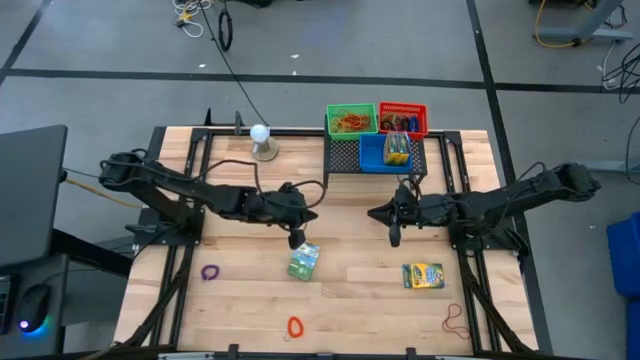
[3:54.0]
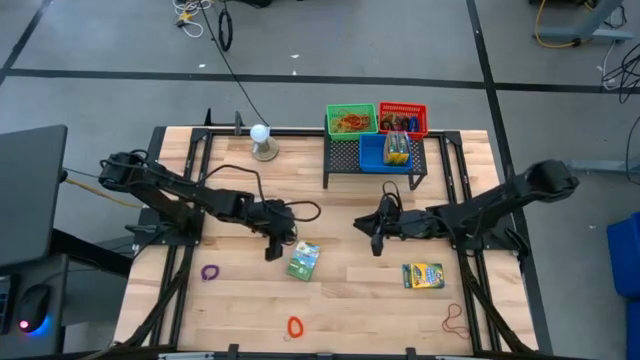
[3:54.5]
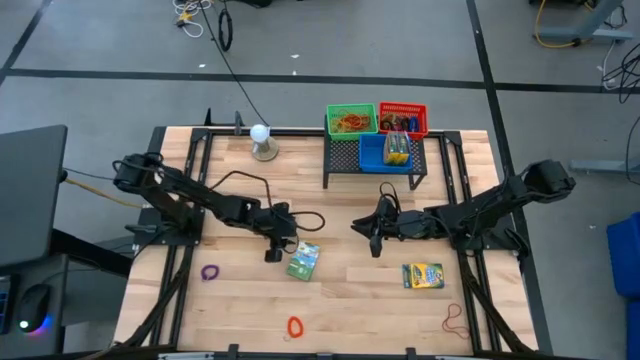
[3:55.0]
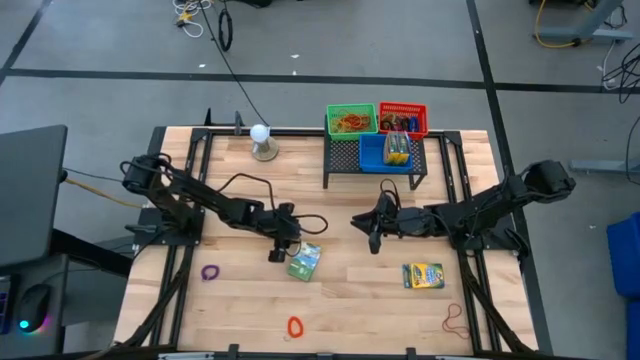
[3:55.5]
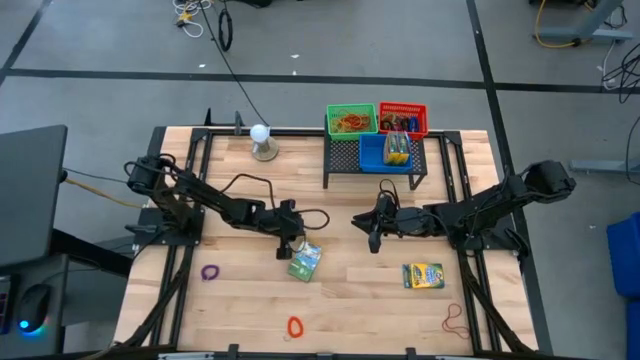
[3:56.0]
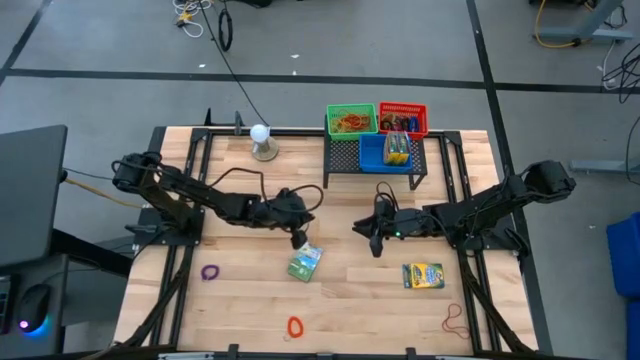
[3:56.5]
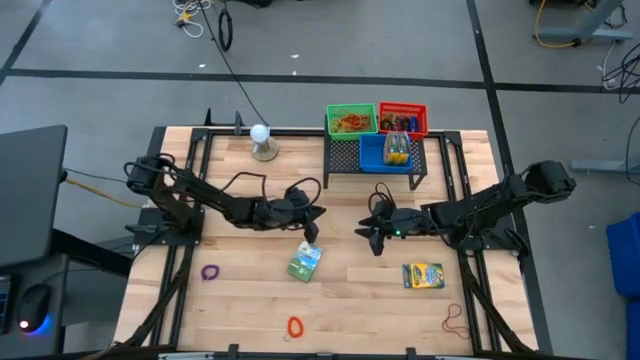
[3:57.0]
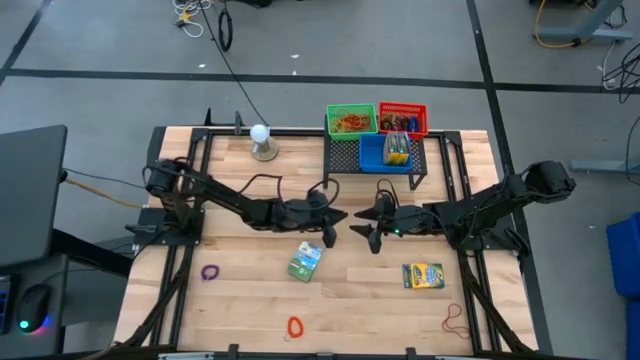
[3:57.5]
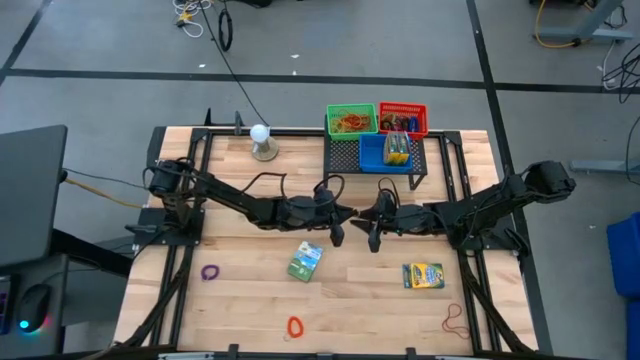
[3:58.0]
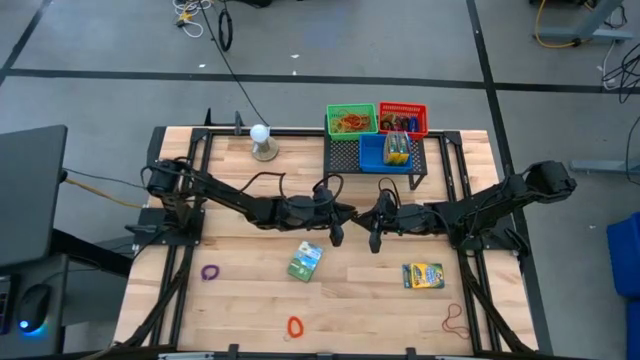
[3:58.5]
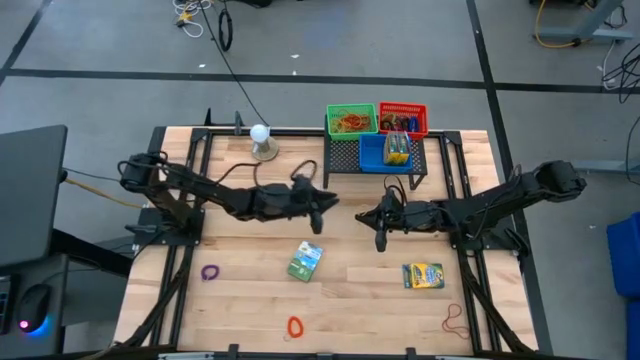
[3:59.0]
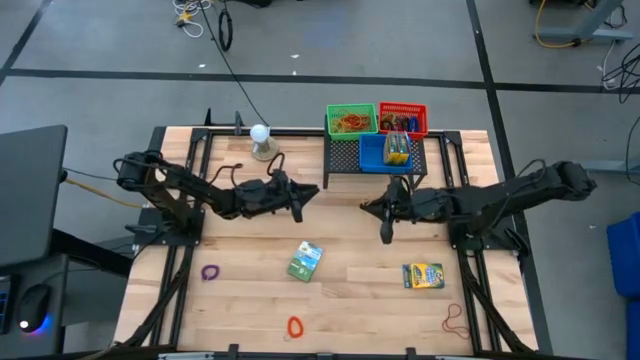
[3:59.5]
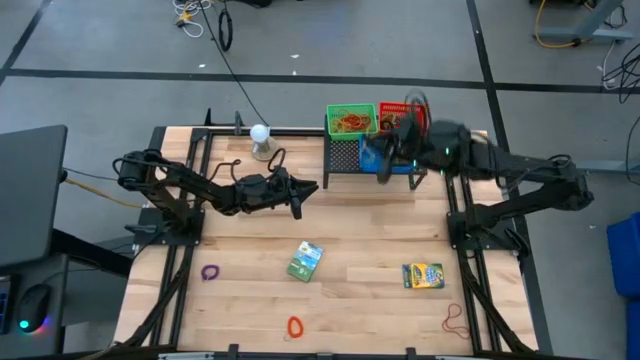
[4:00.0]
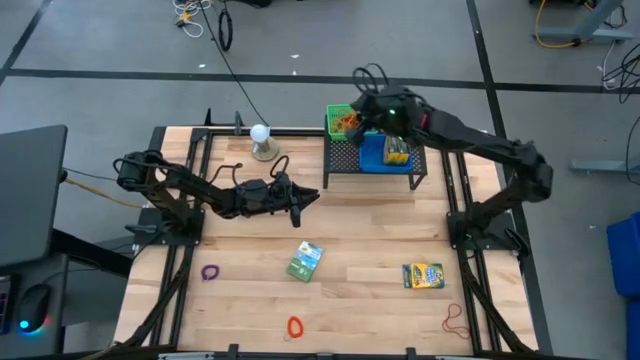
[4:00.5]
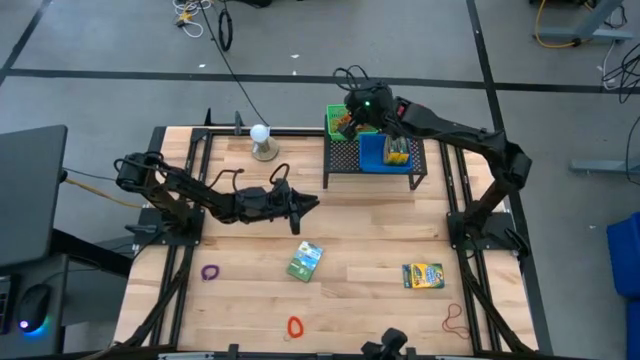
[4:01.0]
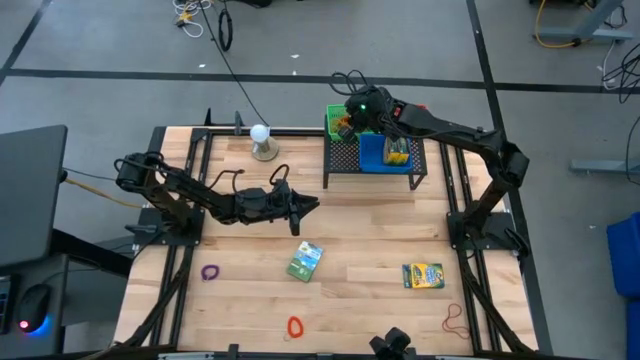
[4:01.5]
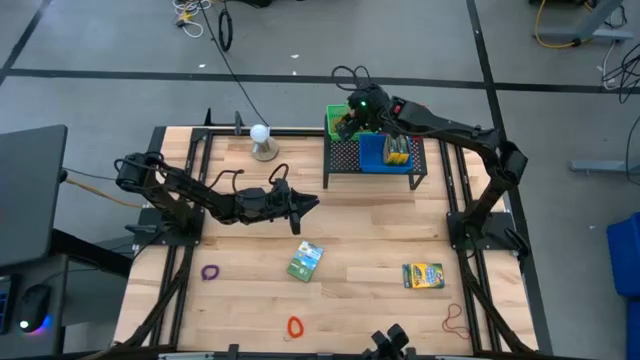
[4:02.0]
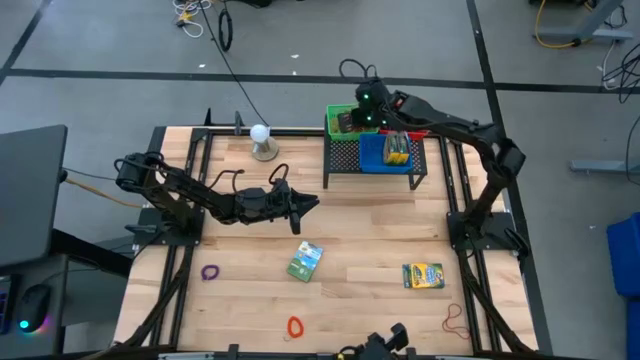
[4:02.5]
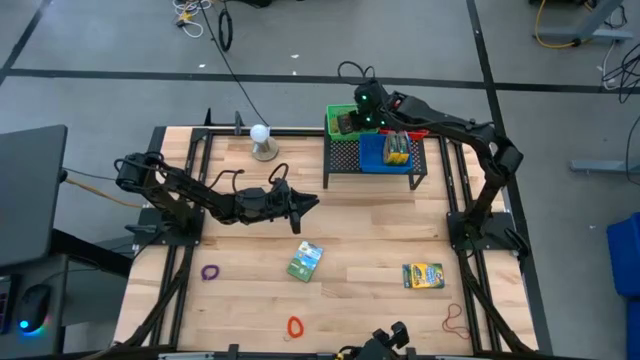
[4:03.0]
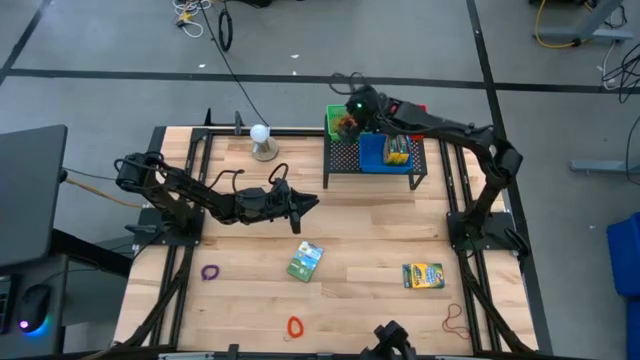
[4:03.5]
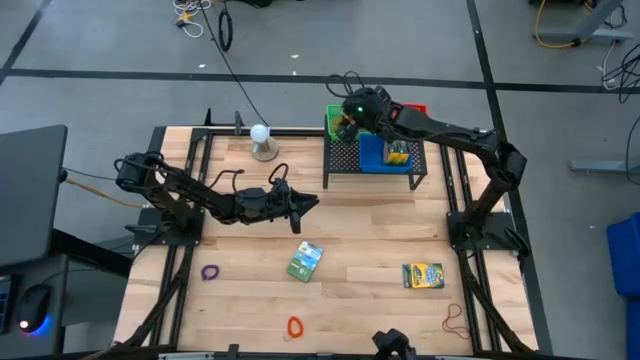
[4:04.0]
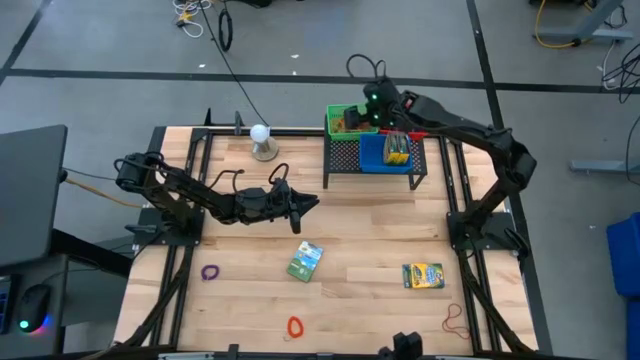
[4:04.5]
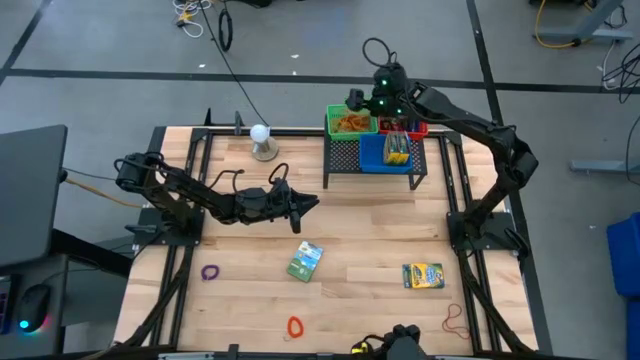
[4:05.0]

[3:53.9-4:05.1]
Task: Pick & Place Office Desk Supplies
Put the yellow rubber band into the green bin

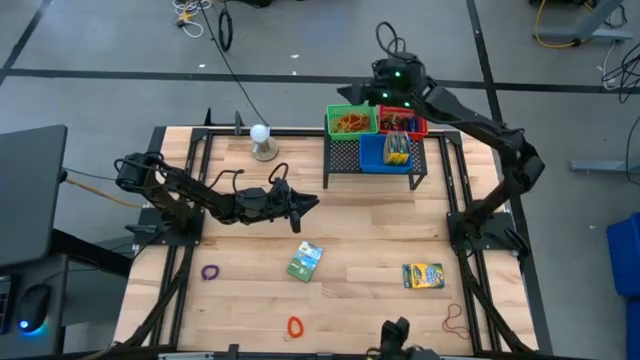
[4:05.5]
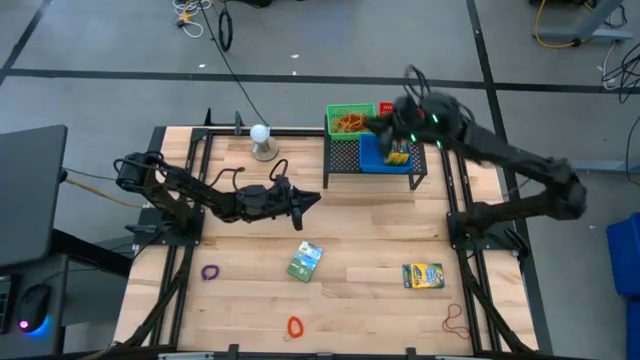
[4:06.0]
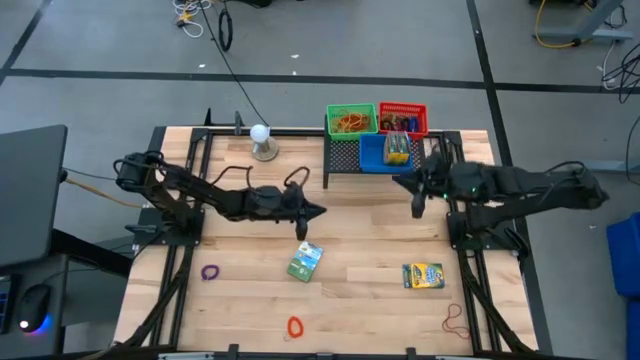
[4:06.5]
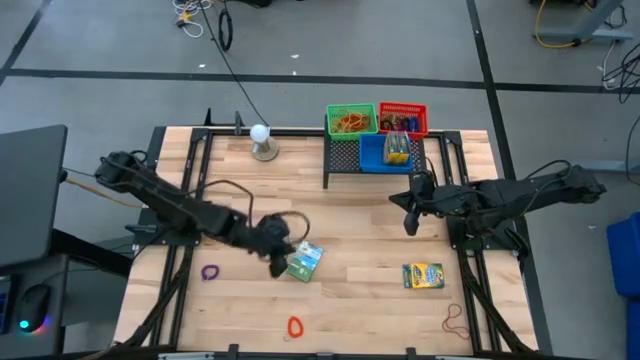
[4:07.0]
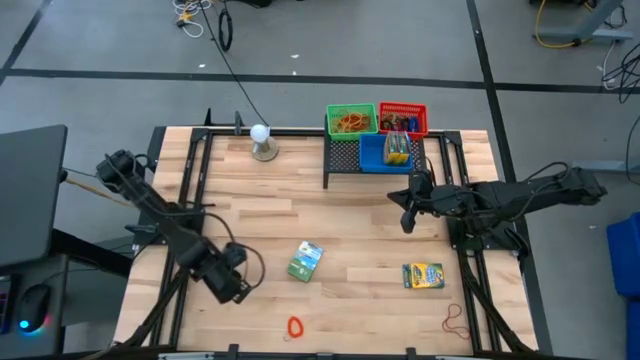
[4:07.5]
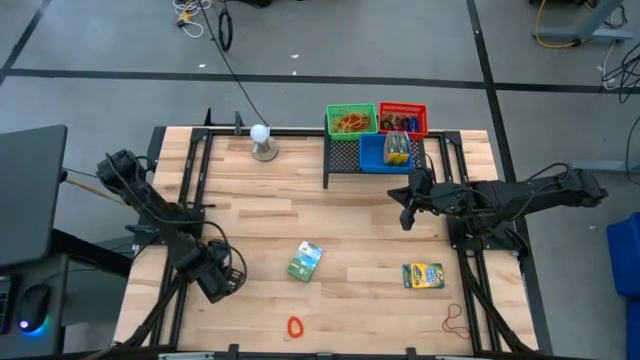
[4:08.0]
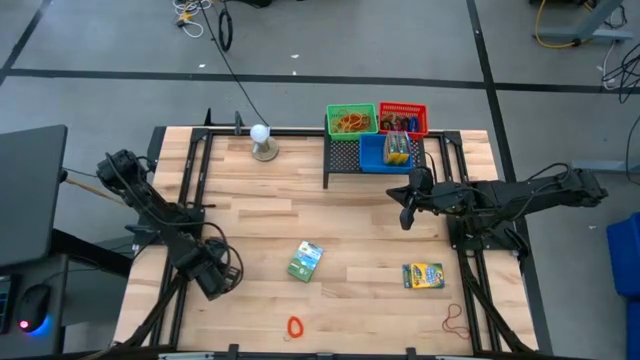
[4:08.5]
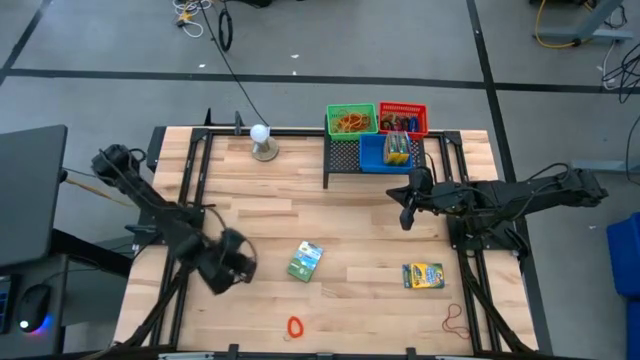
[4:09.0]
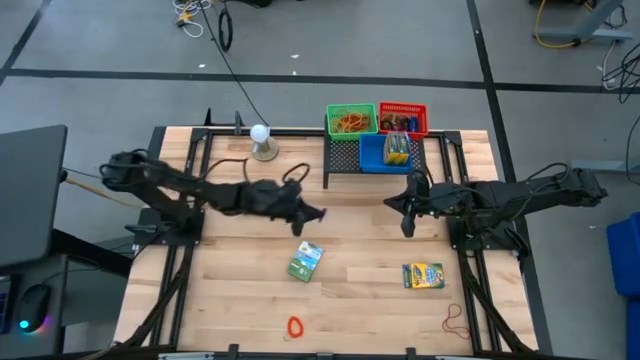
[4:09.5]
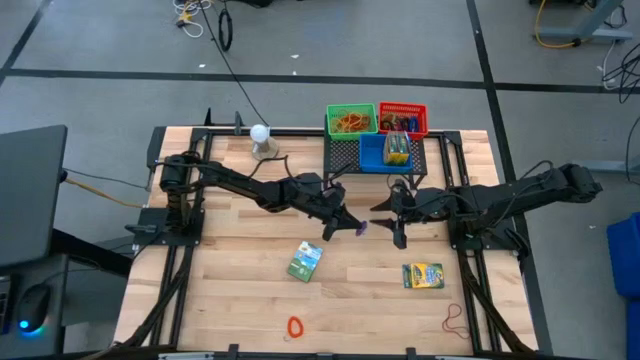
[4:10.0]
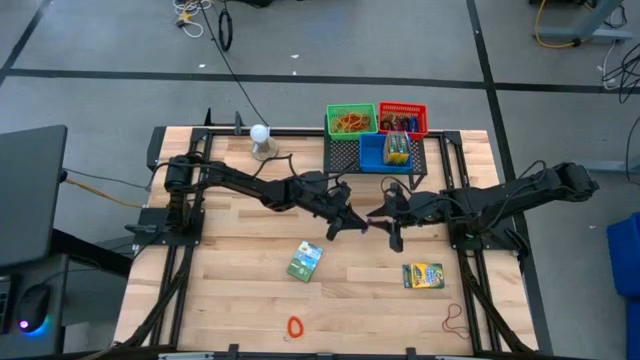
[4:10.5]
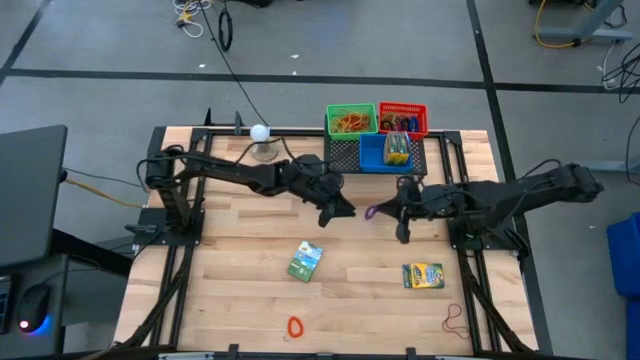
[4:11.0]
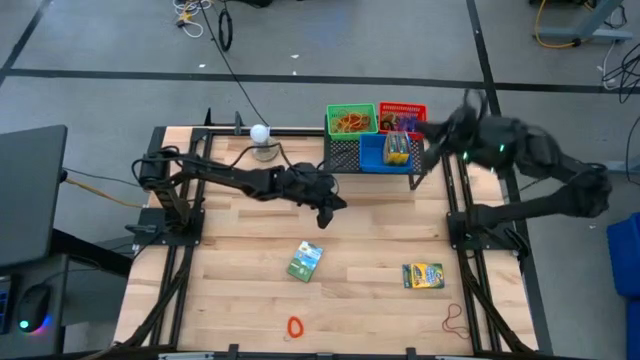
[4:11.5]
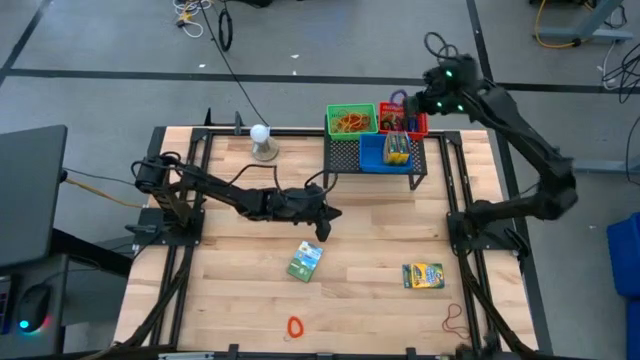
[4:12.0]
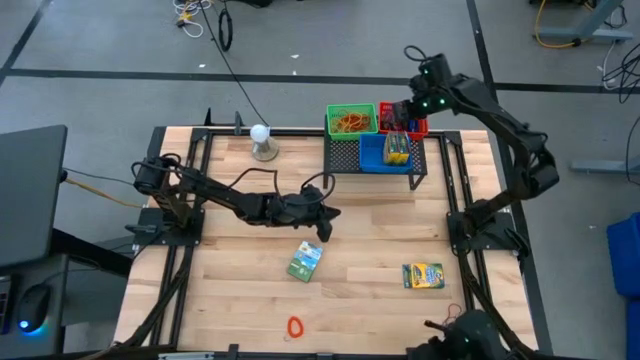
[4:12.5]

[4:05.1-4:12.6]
Put the purple spiral keychain into the red bin

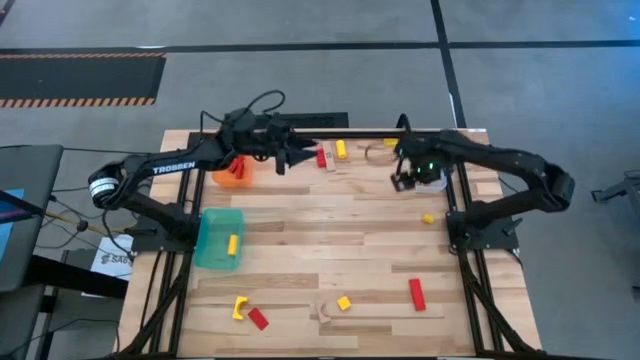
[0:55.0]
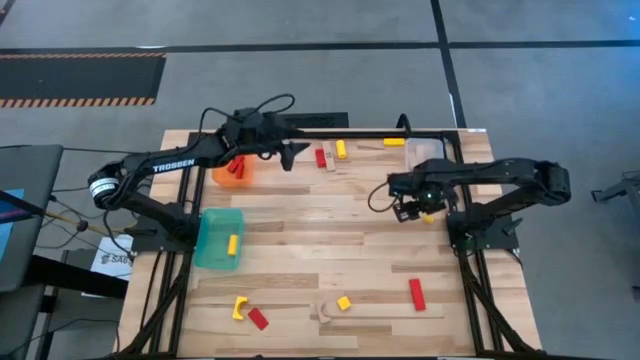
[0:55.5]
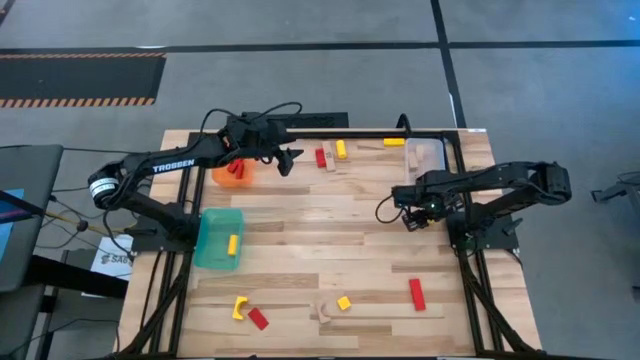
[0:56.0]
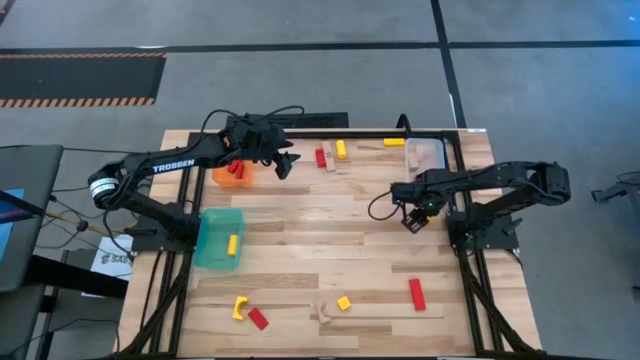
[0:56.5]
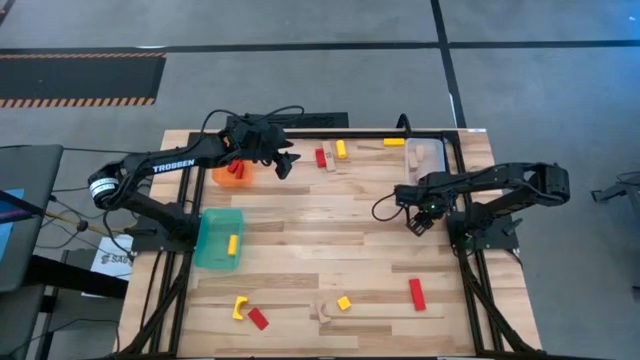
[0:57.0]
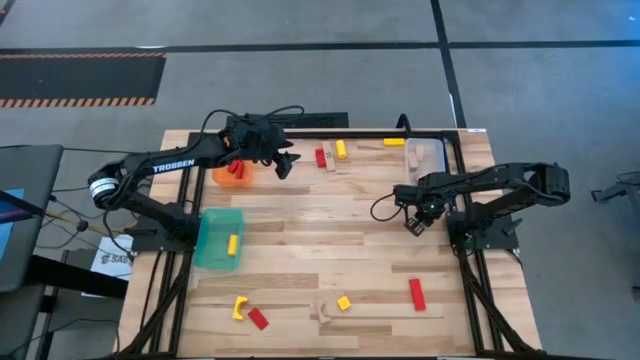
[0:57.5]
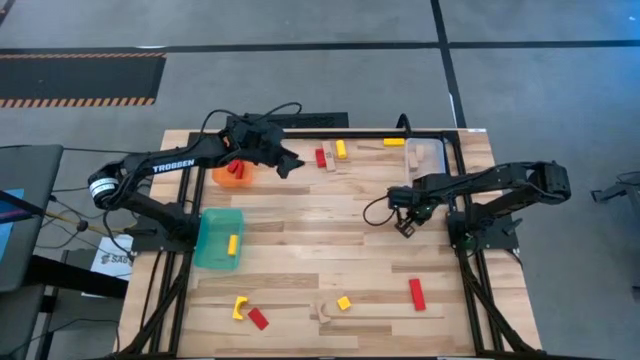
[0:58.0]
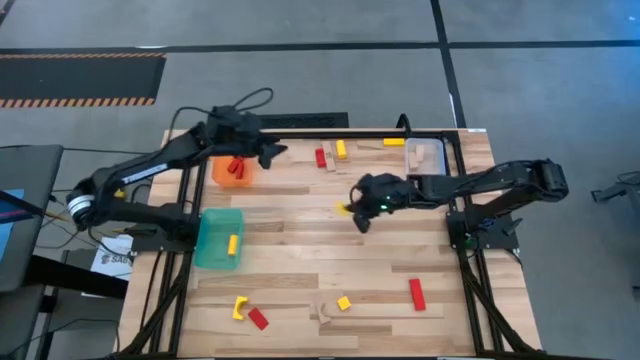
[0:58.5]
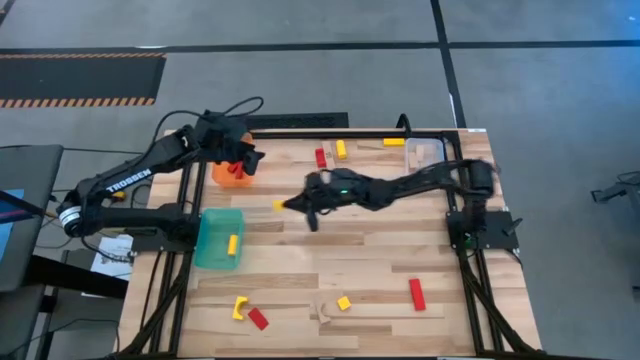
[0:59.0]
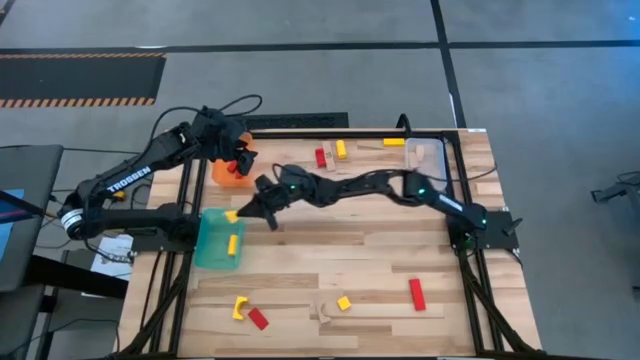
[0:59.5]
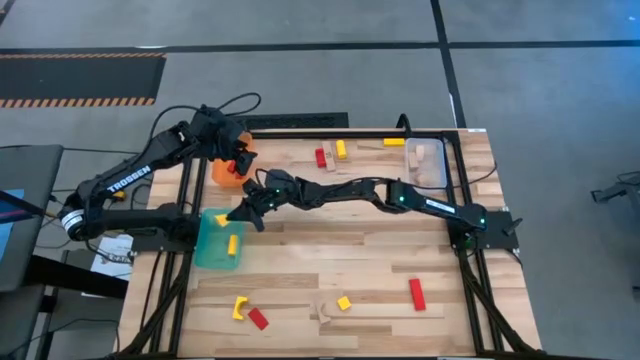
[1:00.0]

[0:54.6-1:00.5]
Task: Sort & place blocks by color
Put the yellow wooden block into the green bin
